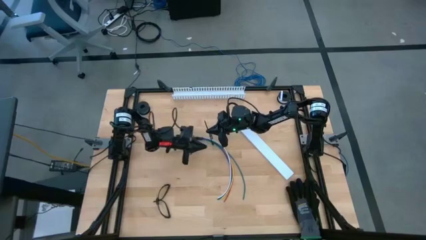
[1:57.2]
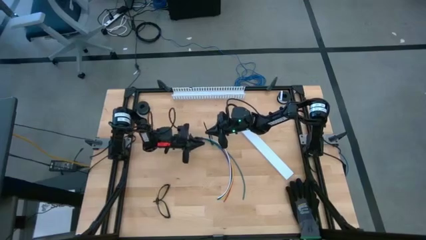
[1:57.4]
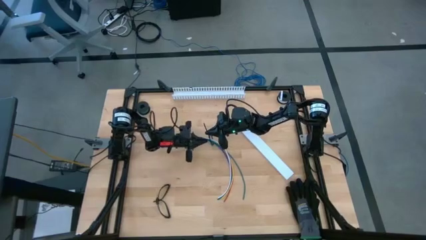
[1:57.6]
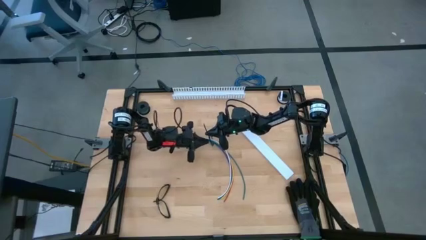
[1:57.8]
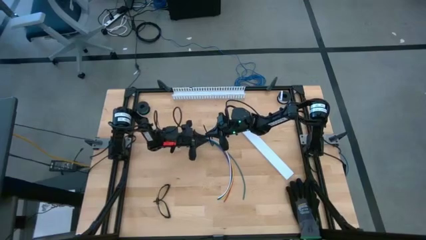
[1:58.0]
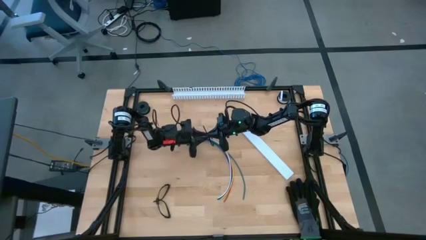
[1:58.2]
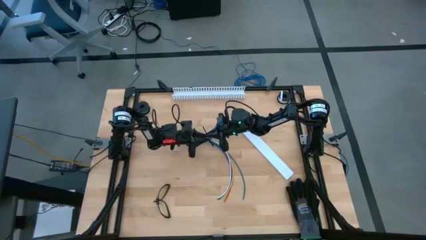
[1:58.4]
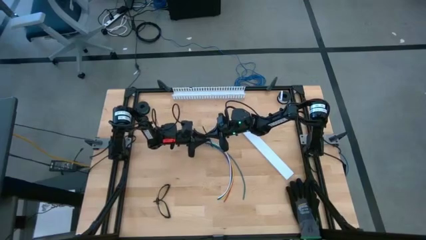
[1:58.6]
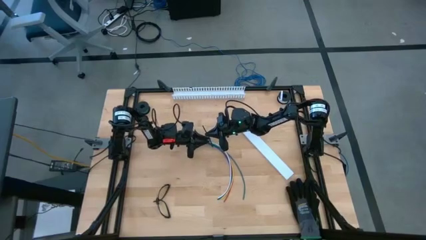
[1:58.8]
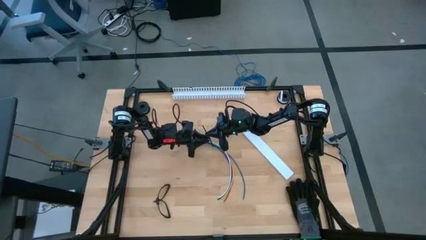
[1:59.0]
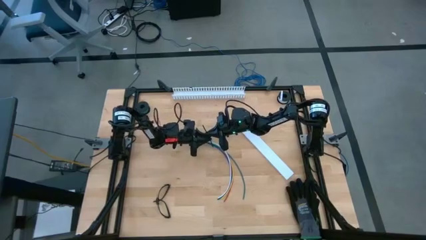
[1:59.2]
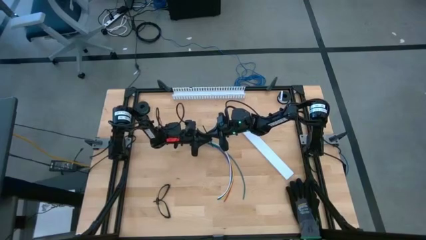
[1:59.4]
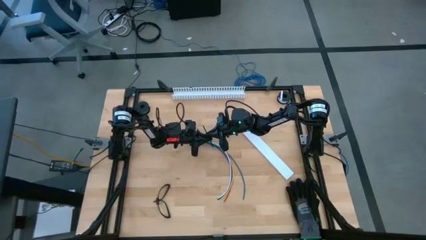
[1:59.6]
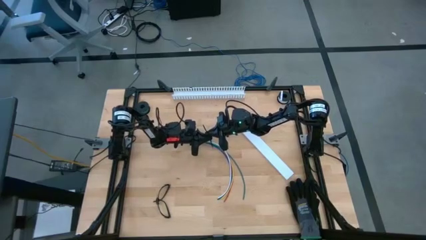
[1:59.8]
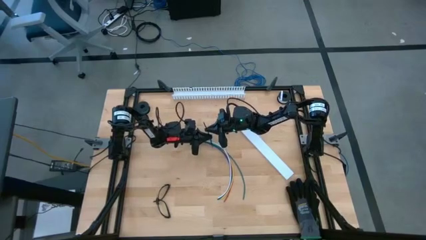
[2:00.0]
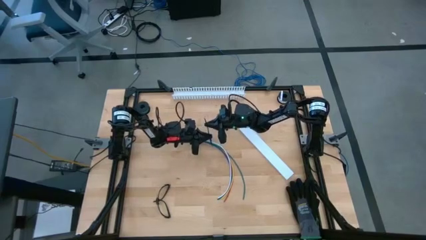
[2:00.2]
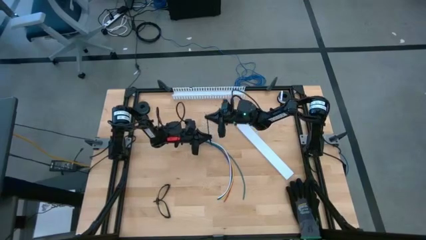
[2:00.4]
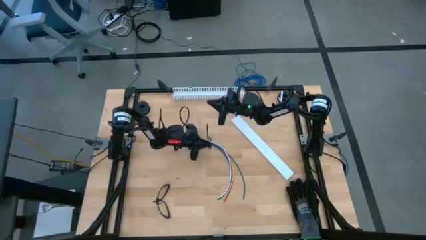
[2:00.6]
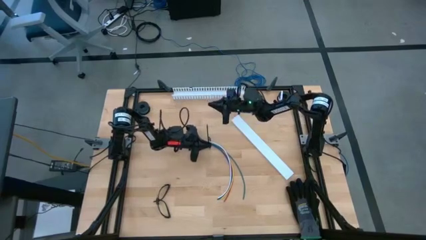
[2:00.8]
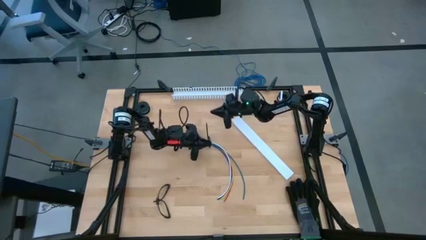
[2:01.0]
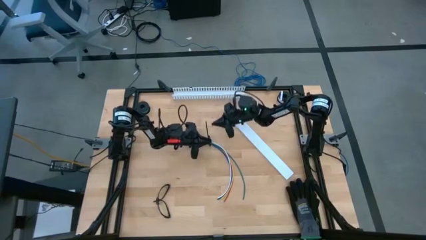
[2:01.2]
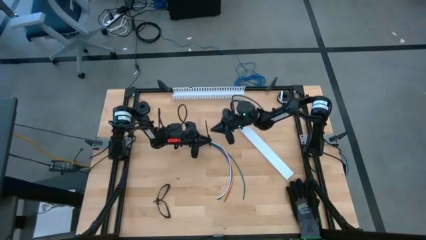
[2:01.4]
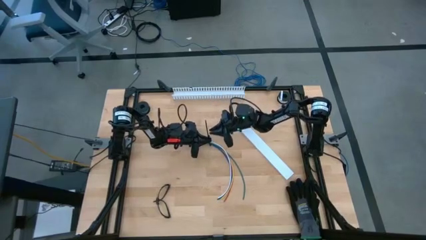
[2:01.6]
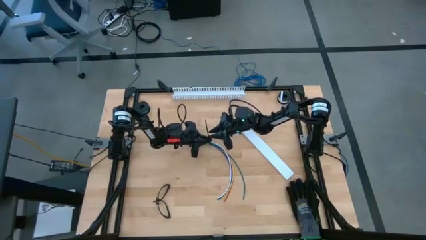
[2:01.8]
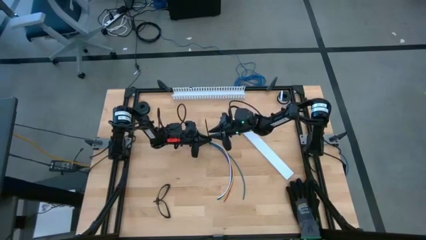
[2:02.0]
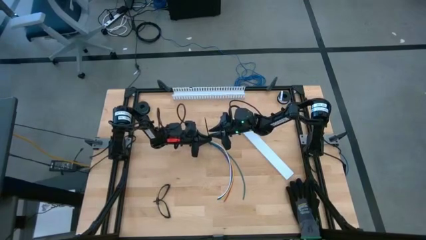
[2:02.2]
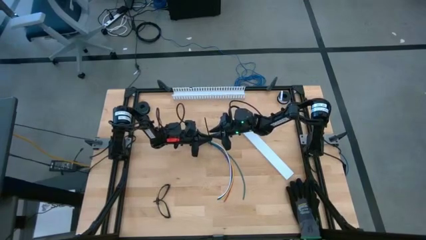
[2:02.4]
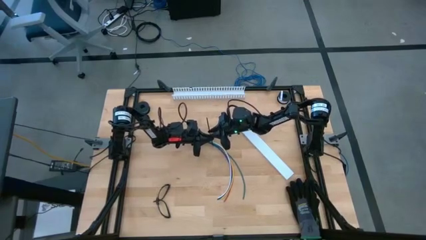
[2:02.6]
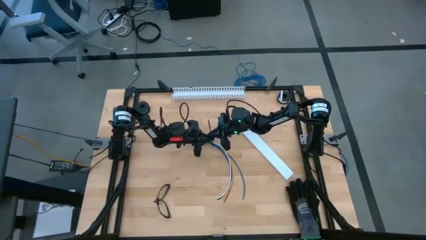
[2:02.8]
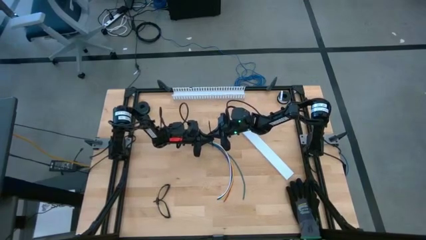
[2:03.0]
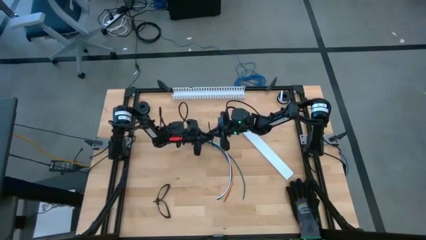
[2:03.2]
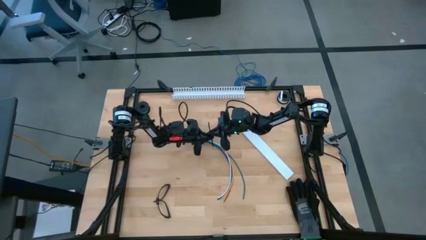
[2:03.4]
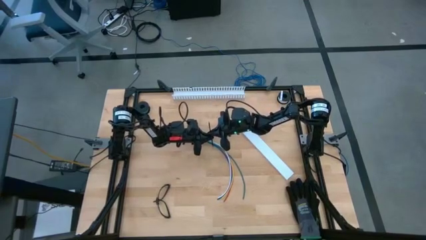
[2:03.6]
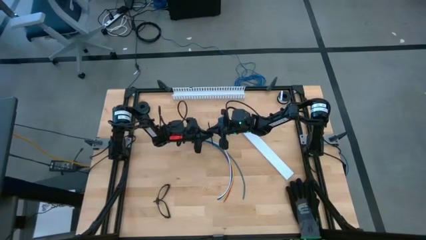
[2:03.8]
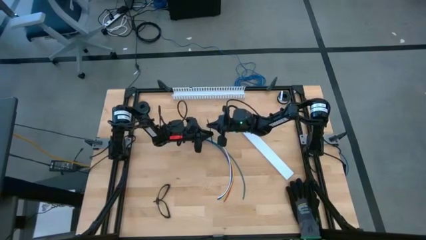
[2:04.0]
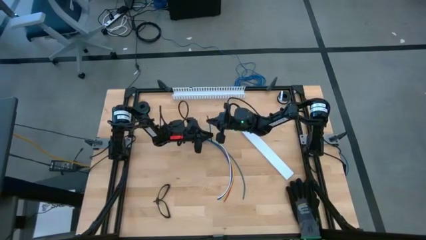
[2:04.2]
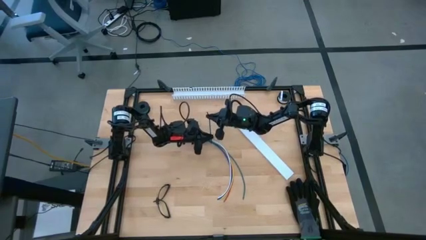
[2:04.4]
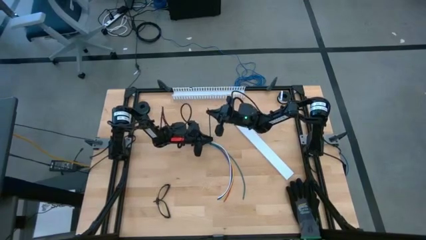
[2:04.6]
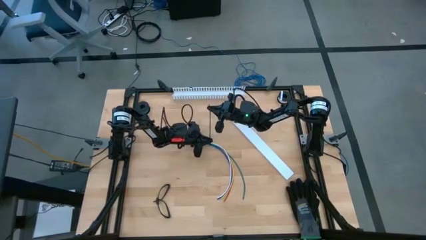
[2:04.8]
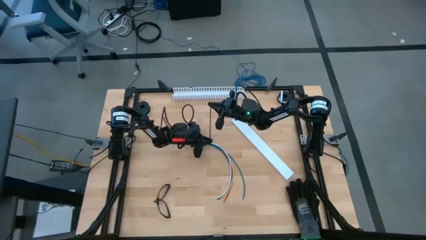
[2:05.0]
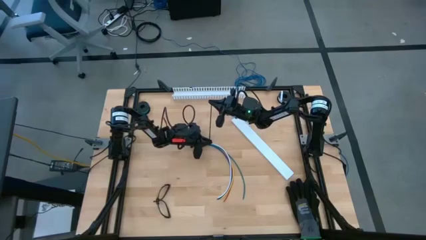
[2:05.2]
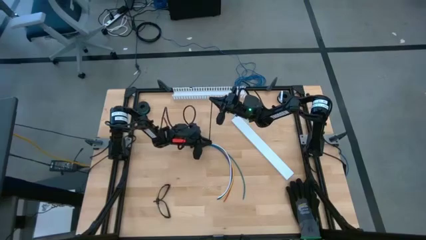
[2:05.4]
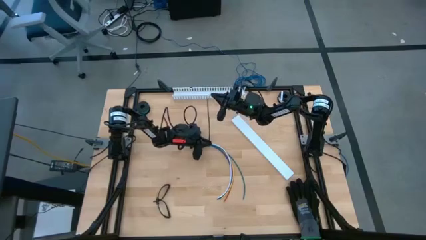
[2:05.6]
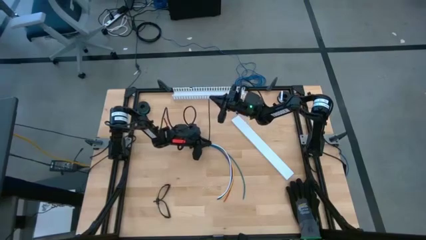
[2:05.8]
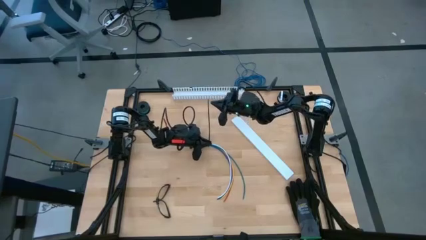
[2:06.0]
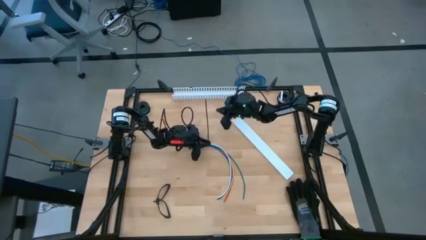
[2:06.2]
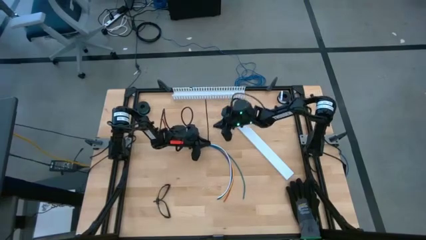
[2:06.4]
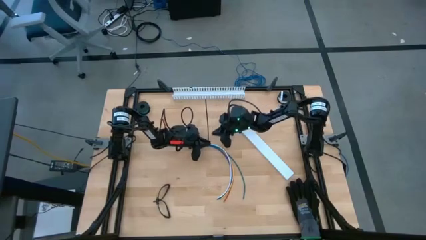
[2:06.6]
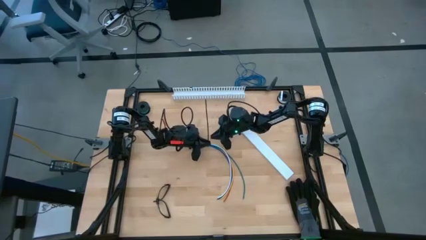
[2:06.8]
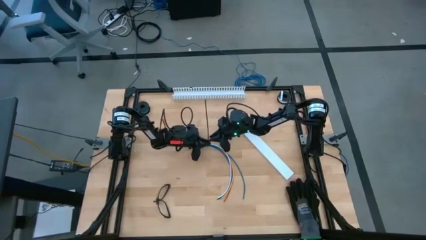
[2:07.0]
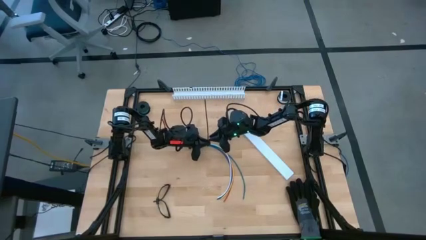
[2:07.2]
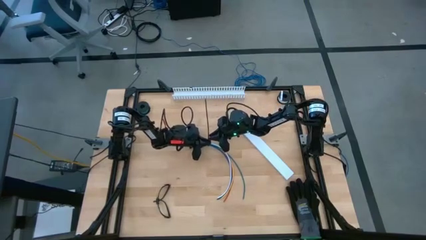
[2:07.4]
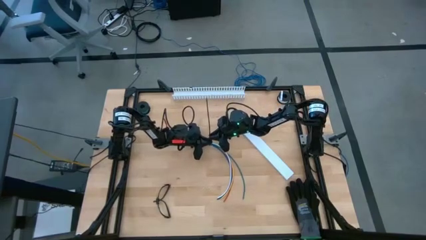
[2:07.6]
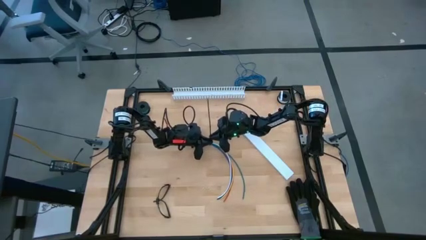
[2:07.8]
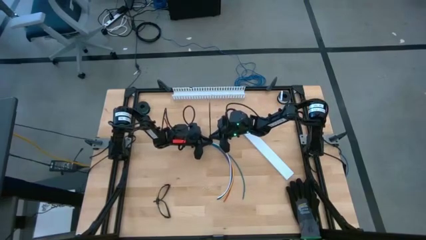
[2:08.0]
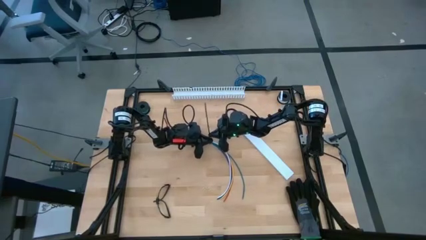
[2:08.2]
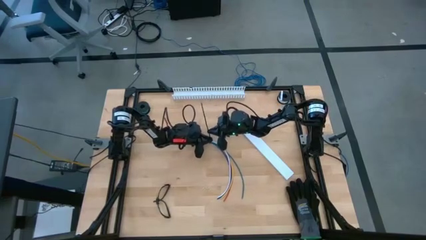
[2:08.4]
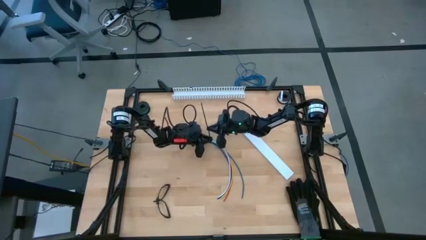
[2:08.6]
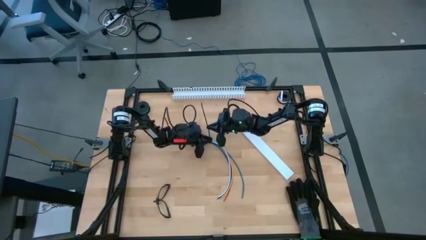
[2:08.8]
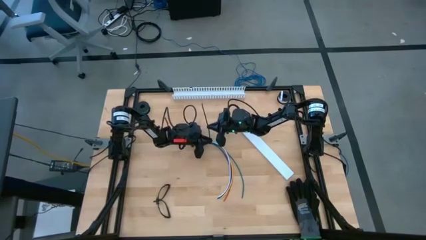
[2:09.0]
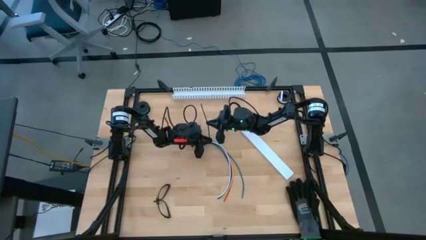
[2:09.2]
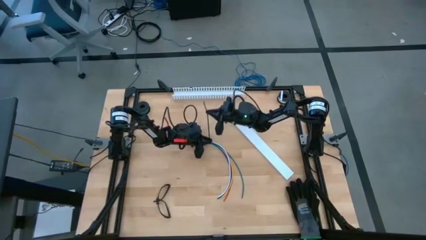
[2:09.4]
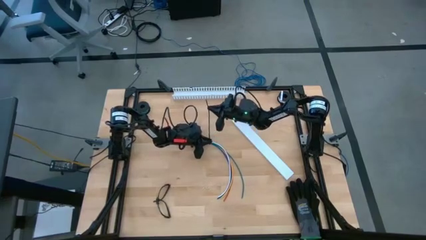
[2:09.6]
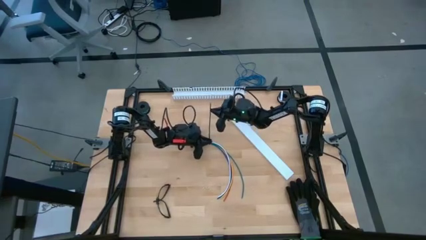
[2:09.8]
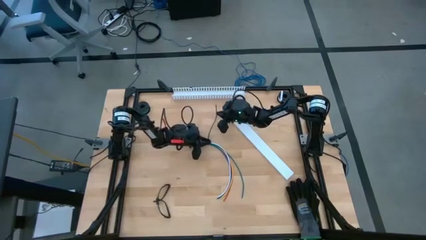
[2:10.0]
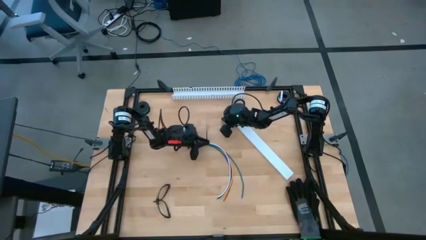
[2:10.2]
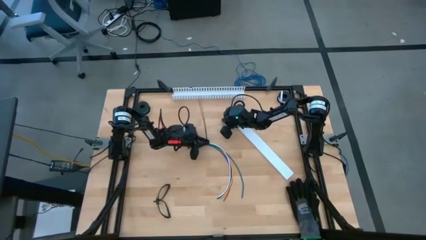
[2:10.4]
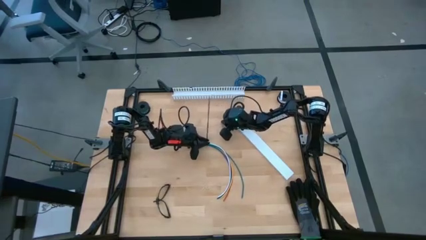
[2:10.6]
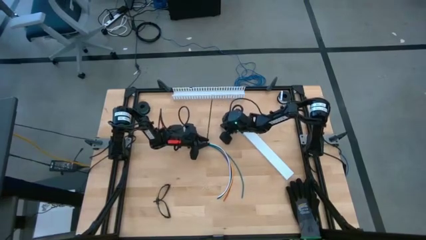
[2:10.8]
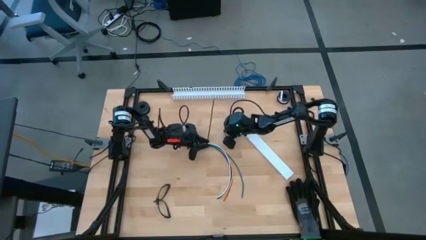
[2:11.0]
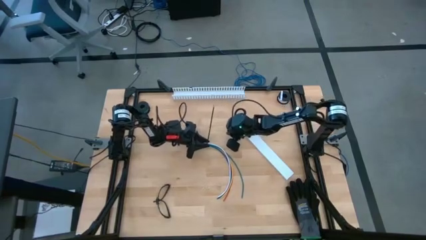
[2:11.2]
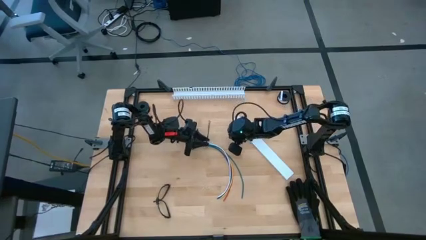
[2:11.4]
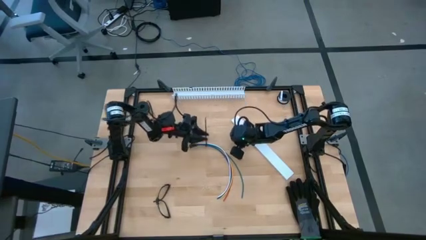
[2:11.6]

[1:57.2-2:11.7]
Task: Ziptie cables
Wrap the zip tie around the cable wires
